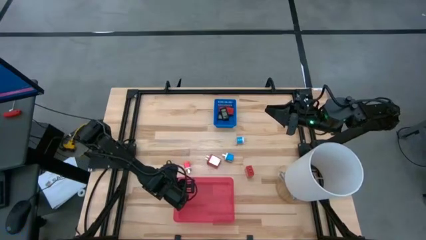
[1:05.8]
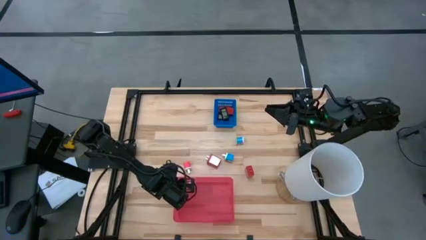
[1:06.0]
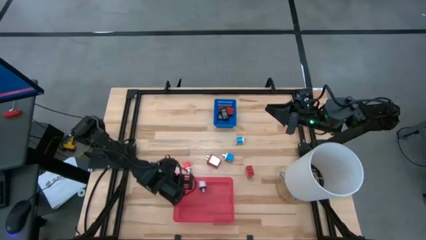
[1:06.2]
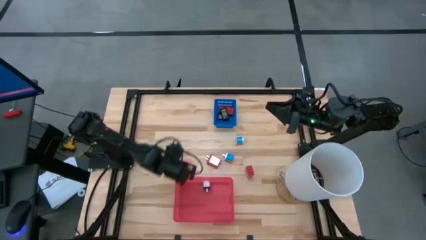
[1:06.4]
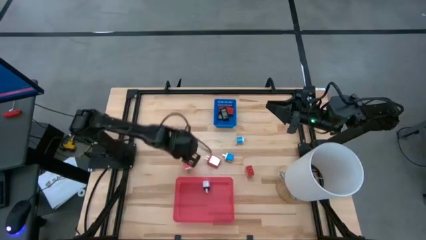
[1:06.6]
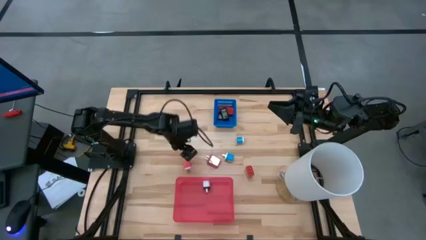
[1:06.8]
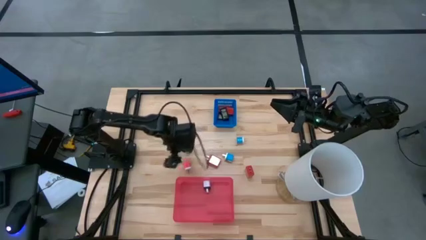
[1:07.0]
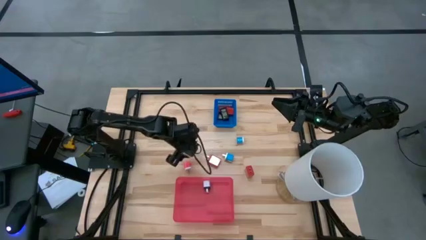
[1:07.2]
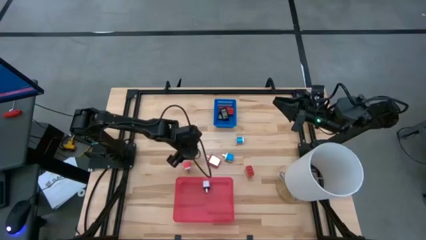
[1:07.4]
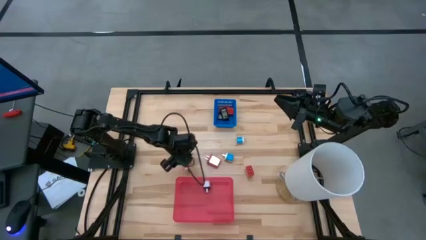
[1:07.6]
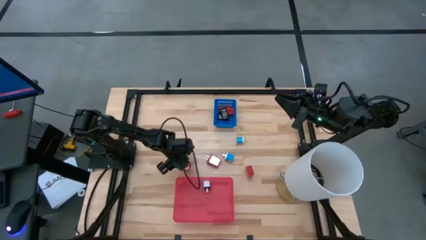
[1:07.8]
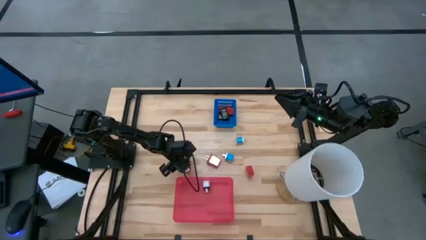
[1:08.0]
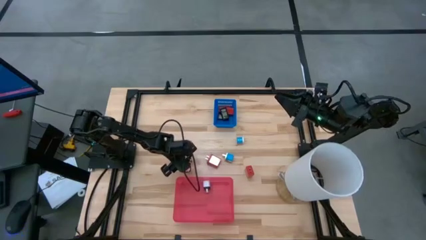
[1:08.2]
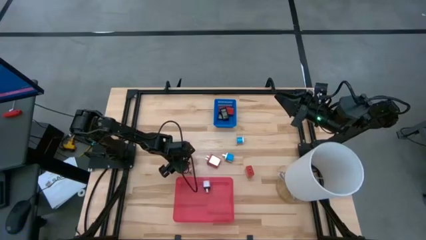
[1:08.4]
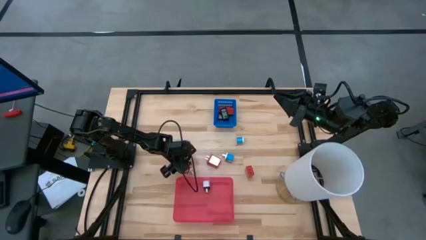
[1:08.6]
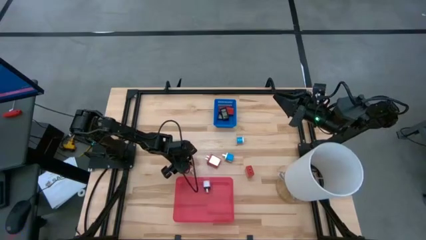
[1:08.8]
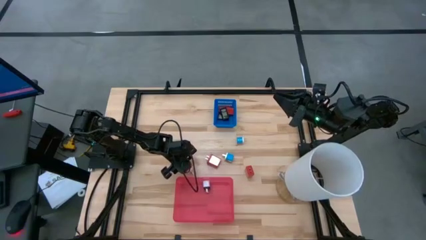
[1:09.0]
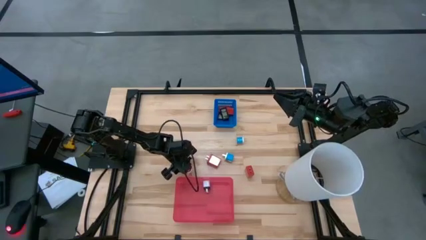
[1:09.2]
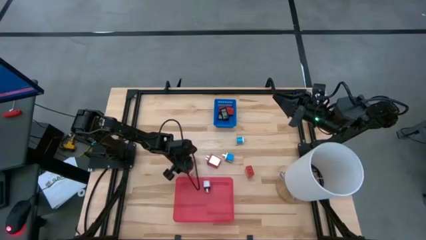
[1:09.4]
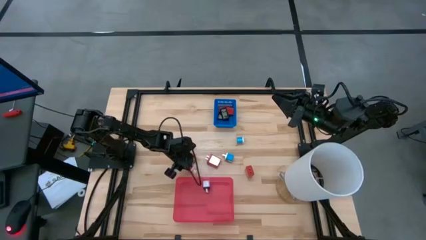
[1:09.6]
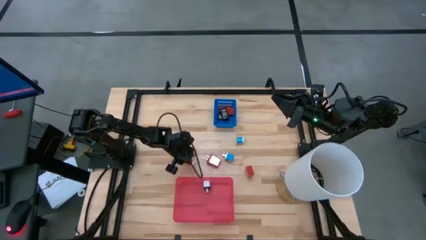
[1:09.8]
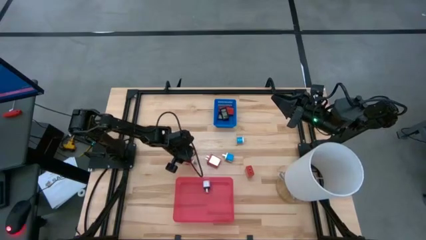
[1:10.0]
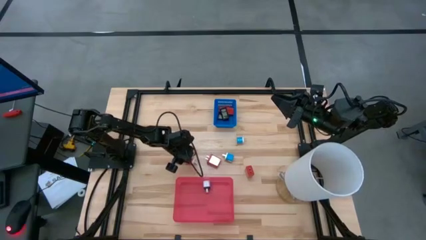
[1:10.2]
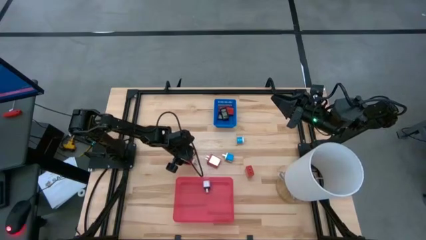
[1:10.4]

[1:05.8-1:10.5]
Task: Pick & Place Office items
Put the pink charger adapter into the red bin

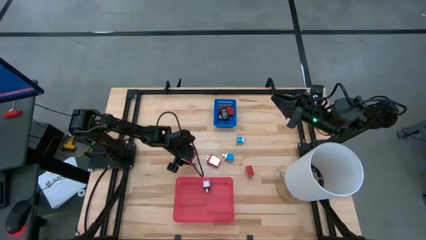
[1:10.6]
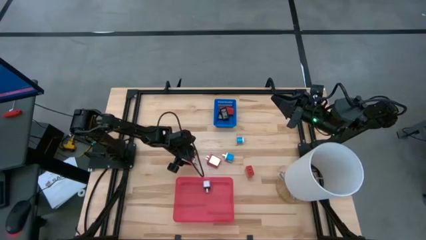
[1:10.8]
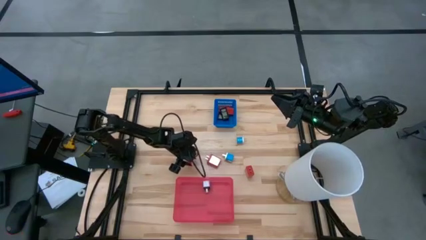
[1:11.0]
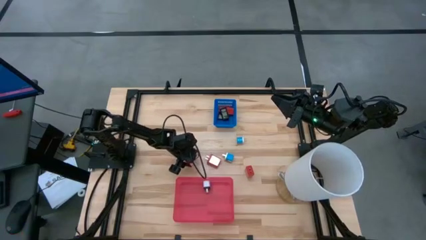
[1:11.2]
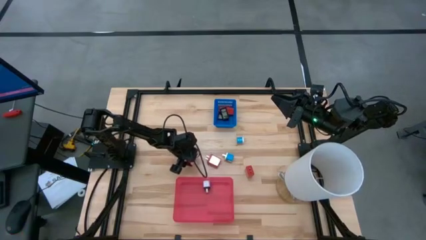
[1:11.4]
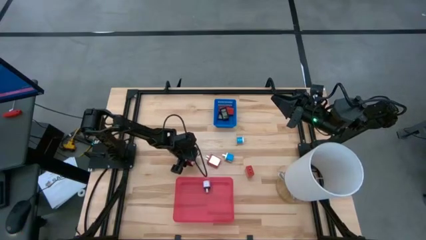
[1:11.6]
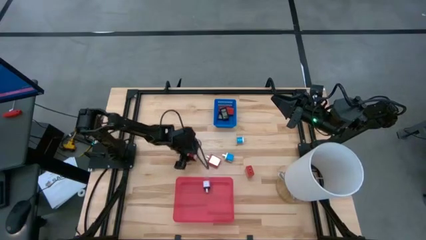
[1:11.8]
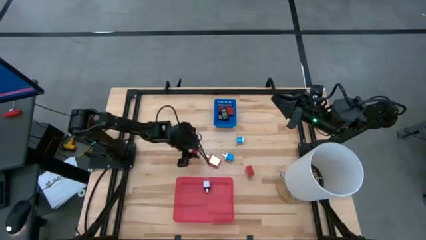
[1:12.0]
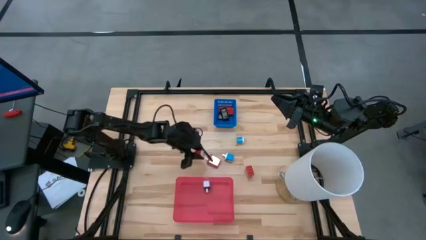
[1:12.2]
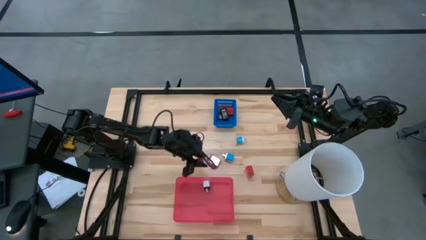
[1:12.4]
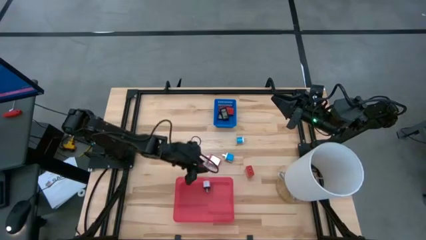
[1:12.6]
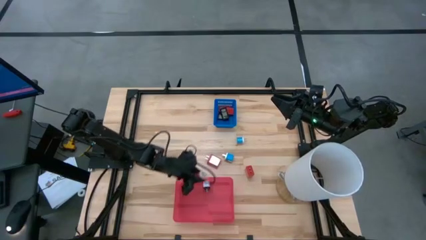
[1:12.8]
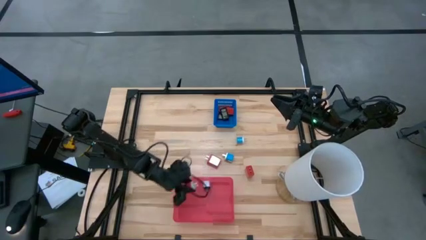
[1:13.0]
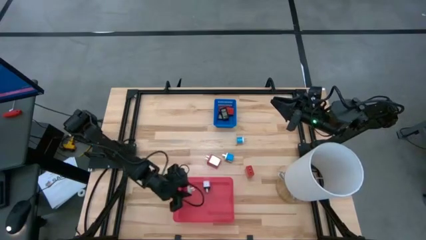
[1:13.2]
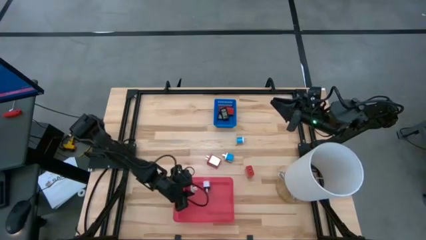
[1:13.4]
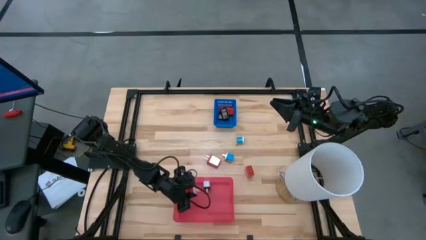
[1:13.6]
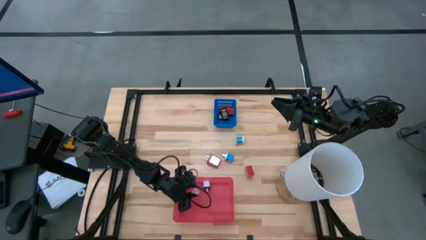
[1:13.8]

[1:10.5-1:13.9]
Put the pink charger adapter into the red bin

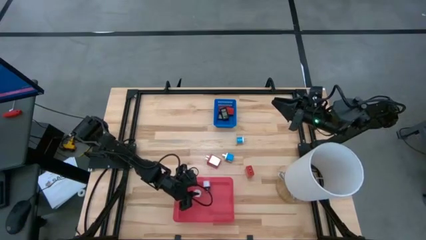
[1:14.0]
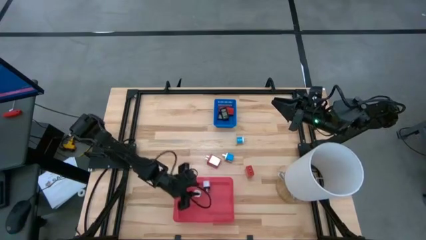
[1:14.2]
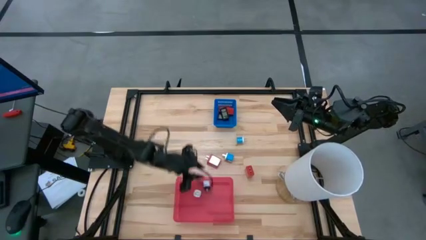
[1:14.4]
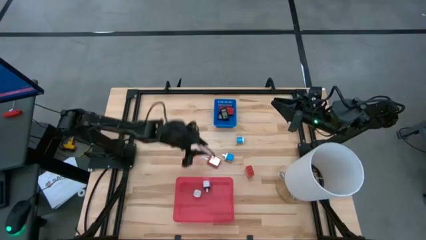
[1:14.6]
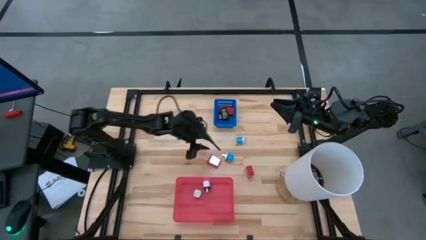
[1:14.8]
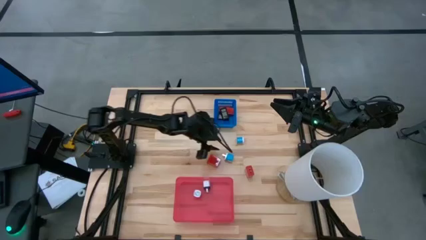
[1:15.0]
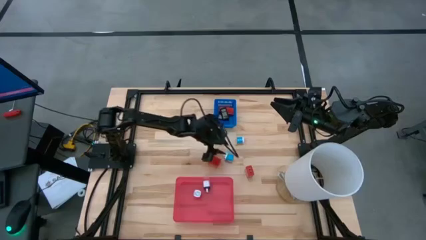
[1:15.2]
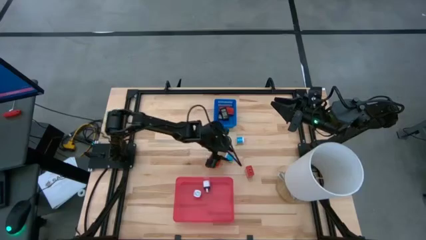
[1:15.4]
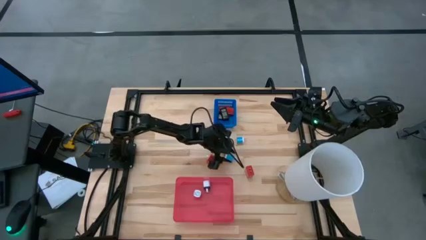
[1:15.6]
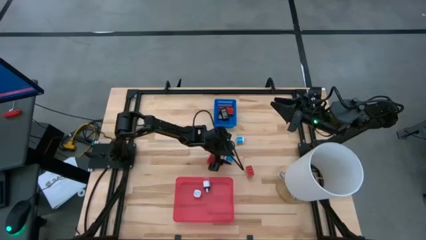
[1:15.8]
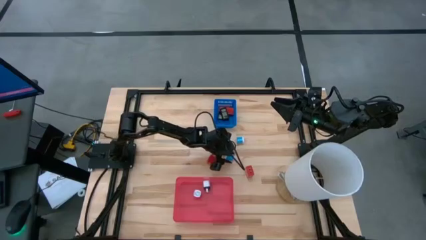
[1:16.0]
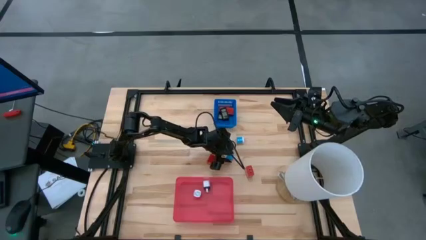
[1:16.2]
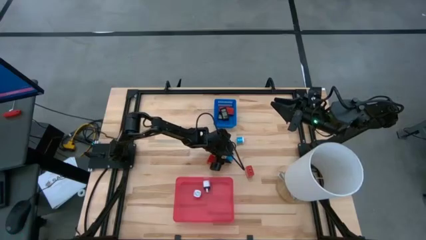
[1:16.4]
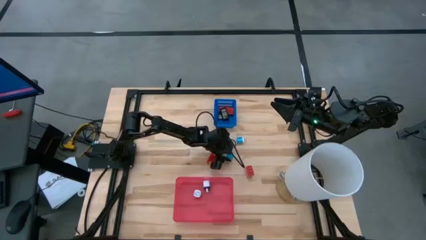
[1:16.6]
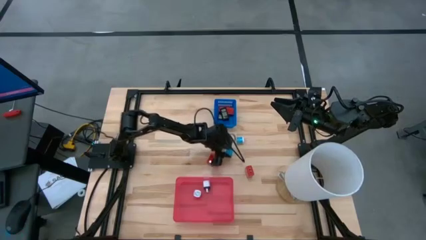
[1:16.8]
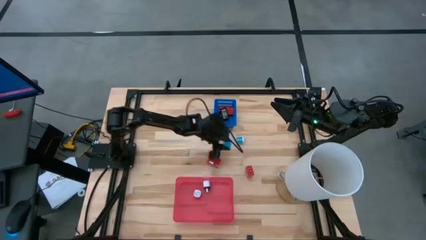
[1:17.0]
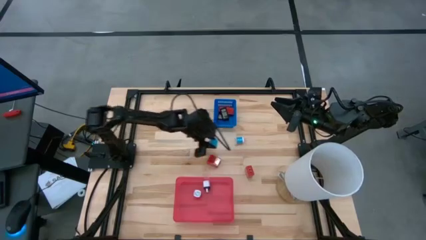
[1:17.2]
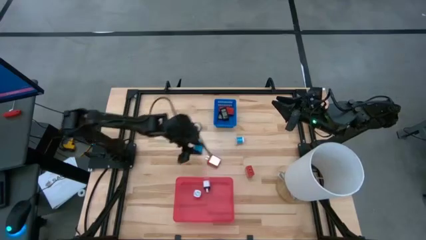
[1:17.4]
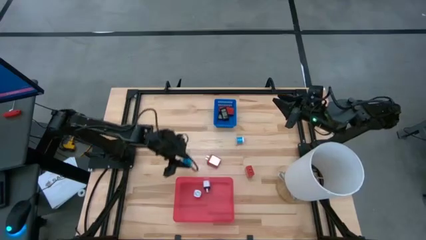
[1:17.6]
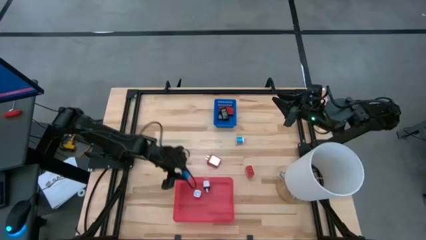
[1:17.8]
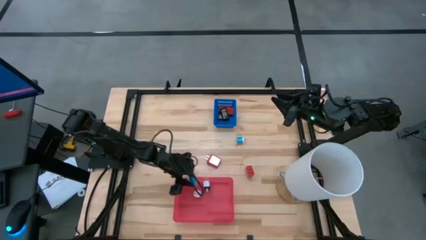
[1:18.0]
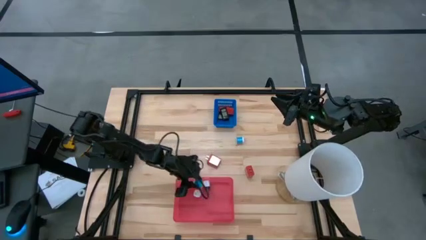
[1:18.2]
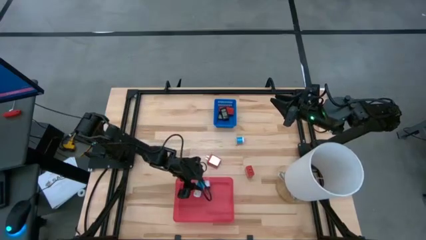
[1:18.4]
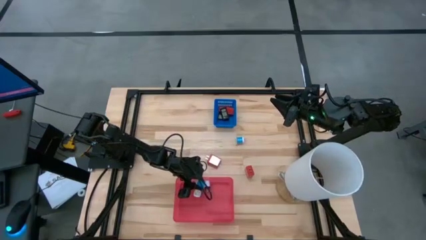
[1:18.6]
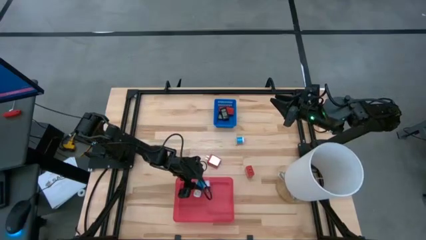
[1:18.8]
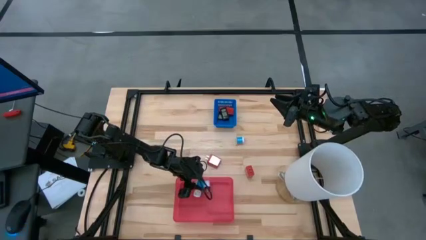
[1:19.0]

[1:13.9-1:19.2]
Put the bottom blue charger adapter into the red bin

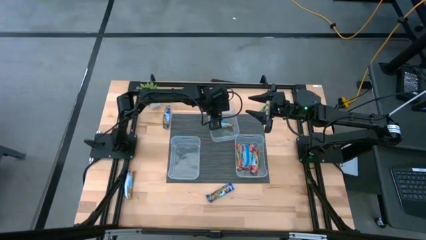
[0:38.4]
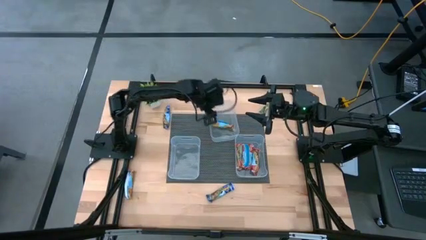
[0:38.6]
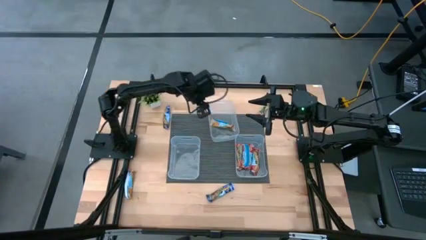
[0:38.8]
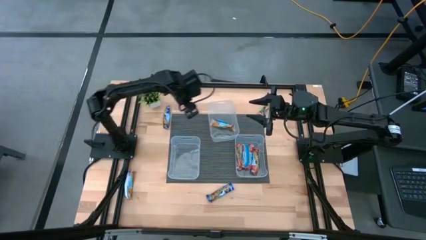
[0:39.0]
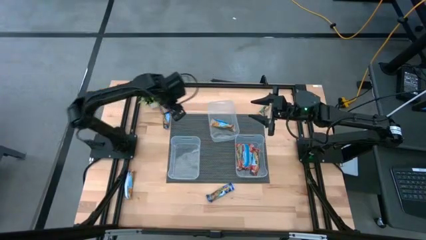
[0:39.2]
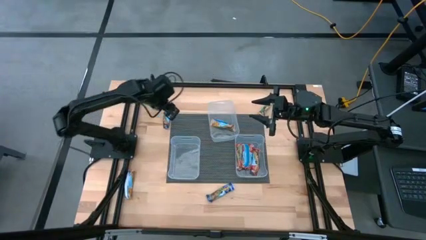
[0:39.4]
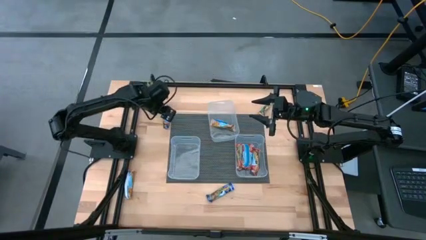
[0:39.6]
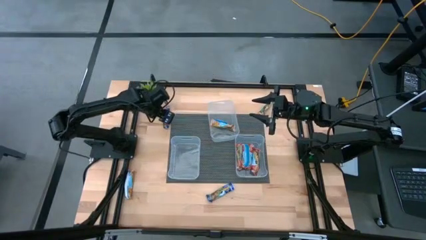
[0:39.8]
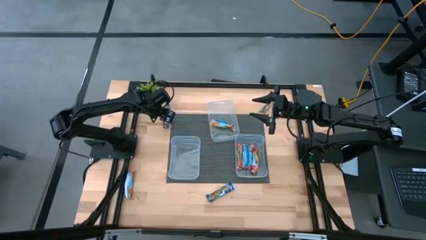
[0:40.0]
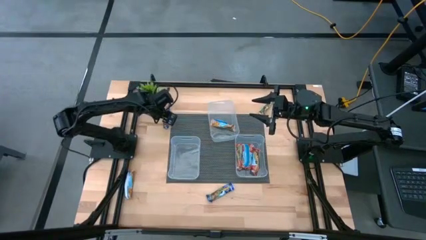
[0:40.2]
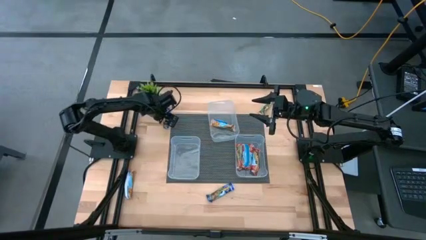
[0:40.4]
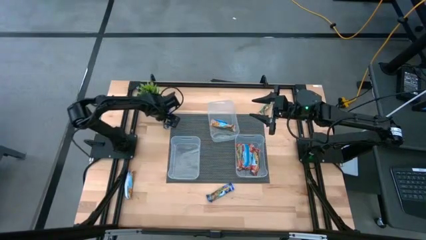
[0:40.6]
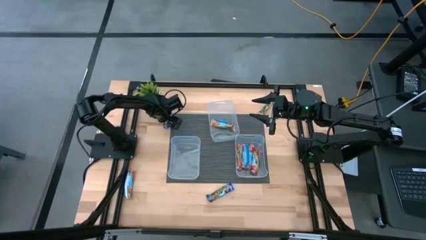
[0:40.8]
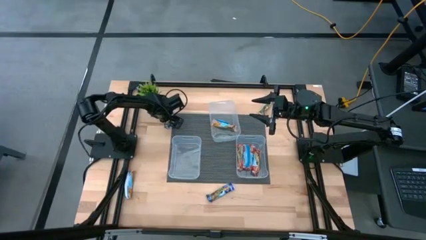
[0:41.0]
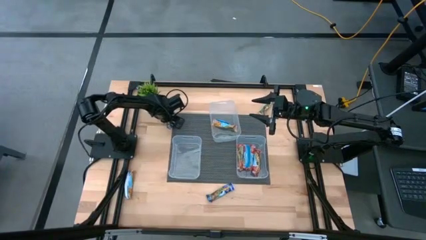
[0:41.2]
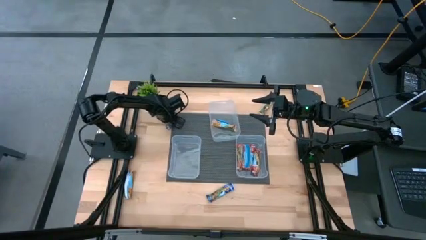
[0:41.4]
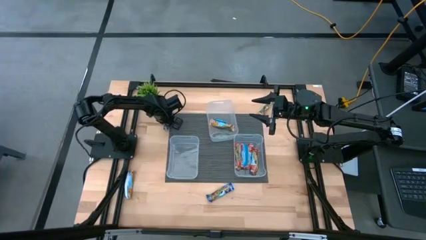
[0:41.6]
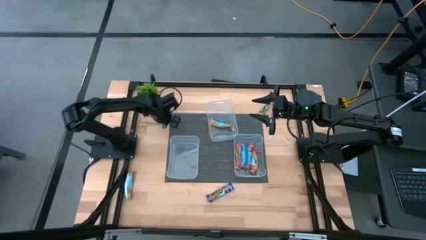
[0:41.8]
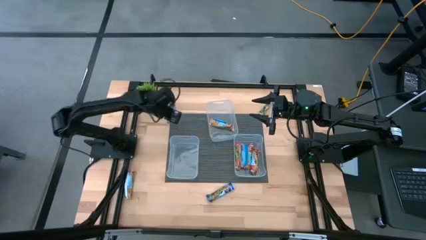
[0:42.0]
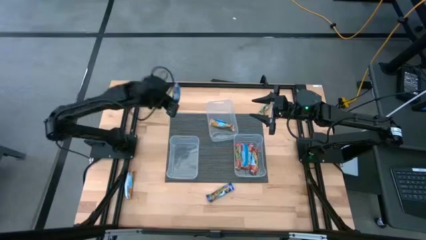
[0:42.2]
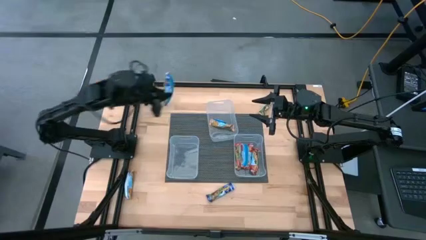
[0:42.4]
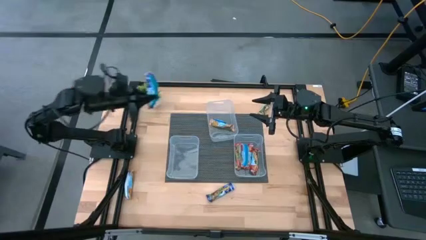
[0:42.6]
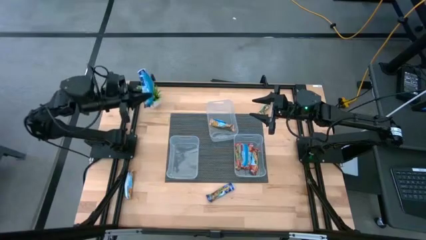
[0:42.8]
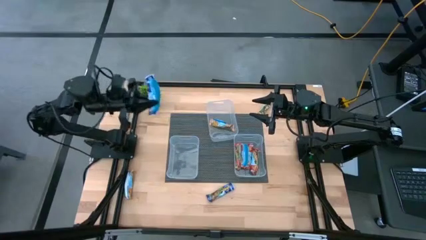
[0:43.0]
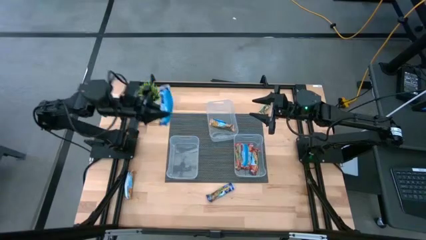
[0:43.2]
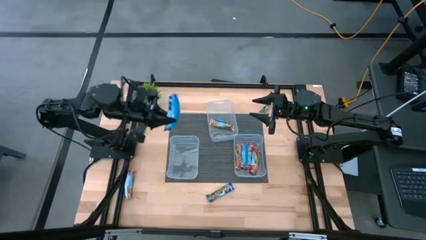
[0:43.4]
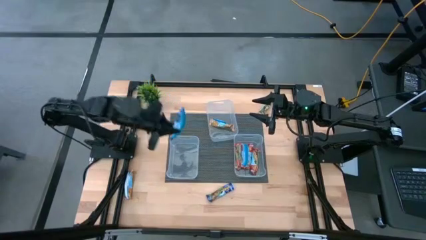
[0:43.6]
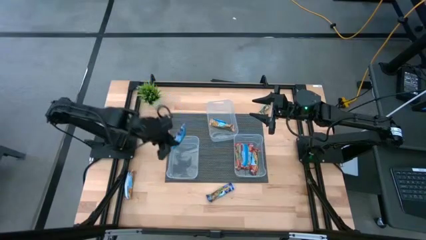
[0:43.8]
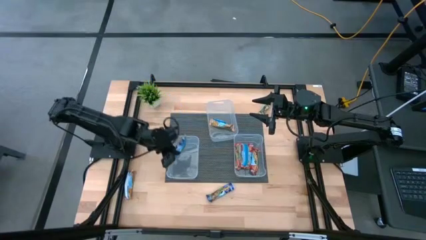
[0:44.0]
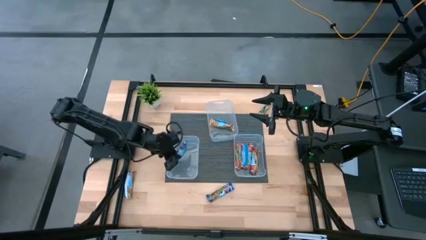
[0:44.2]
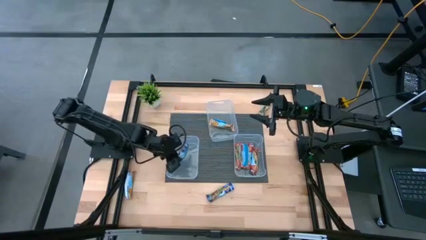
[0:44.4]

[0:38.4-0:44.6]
Task: Pick and place Granola Bars by type
Put the blue granola bar into the bottom left transparent bin
